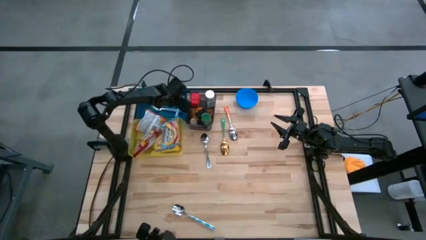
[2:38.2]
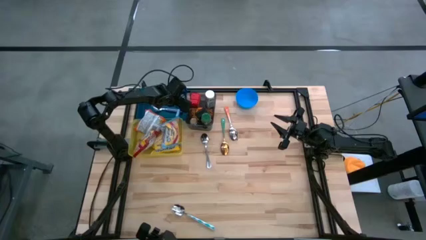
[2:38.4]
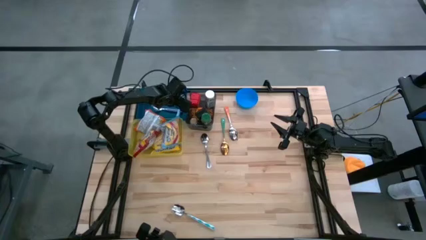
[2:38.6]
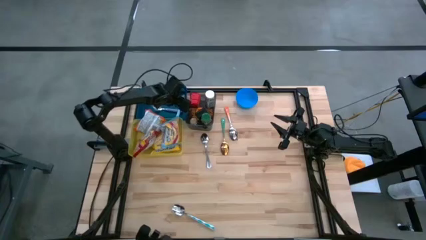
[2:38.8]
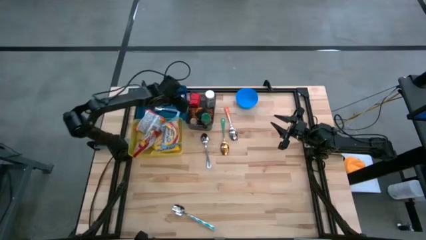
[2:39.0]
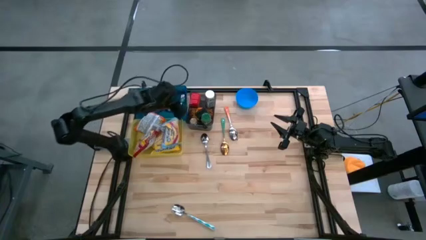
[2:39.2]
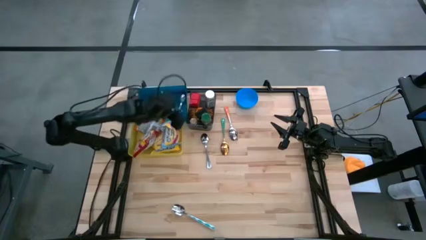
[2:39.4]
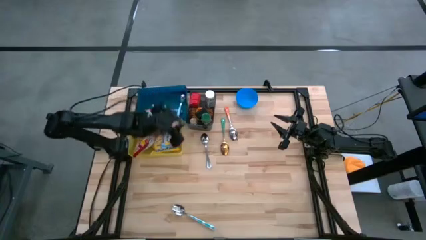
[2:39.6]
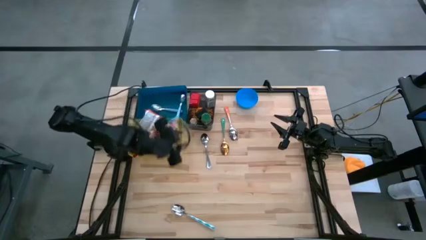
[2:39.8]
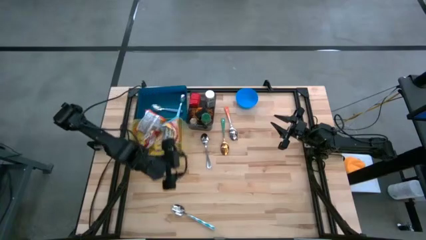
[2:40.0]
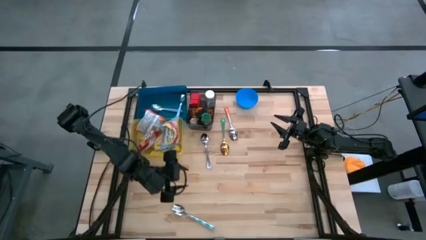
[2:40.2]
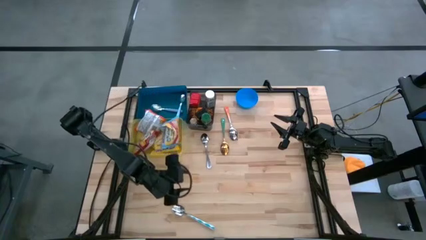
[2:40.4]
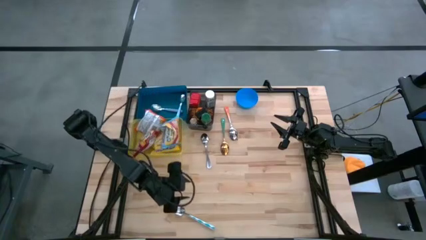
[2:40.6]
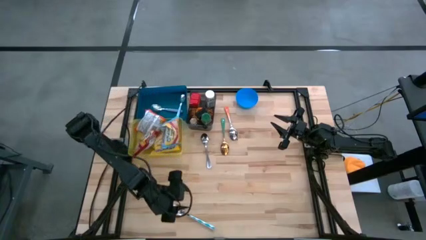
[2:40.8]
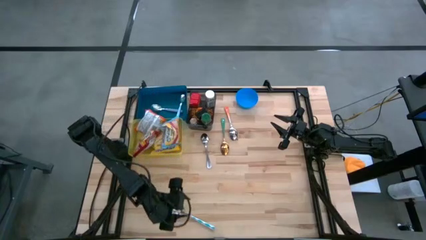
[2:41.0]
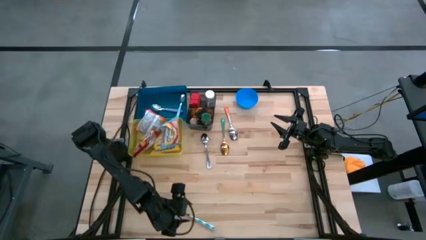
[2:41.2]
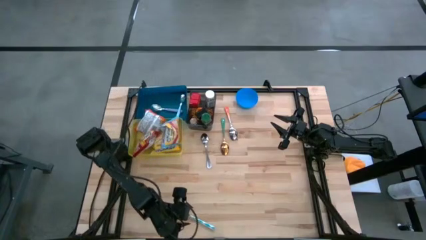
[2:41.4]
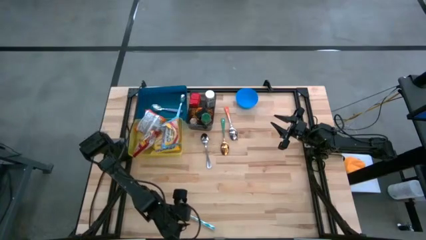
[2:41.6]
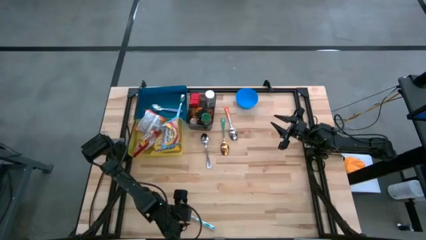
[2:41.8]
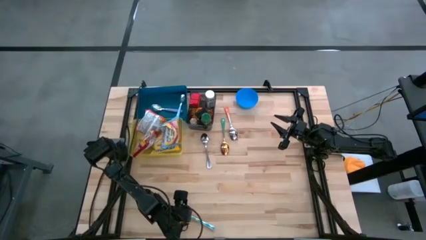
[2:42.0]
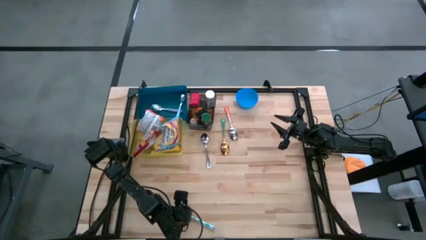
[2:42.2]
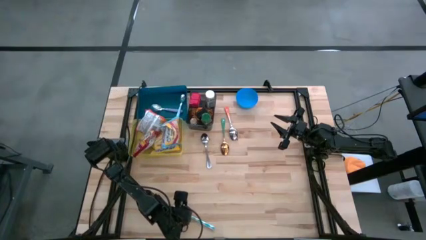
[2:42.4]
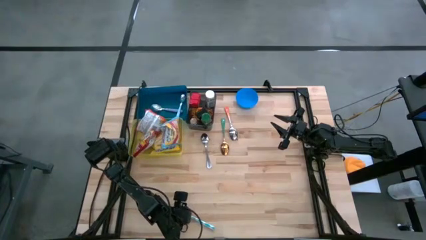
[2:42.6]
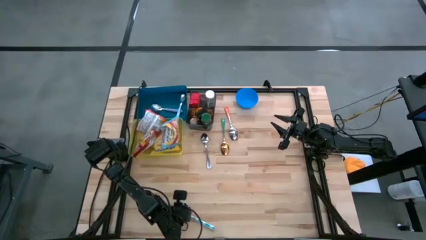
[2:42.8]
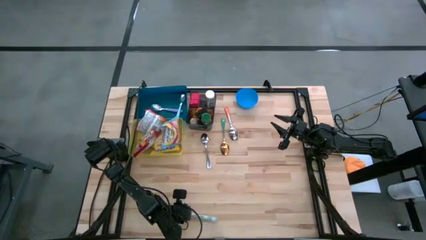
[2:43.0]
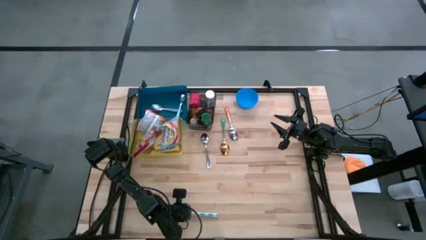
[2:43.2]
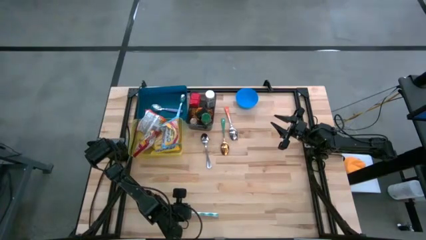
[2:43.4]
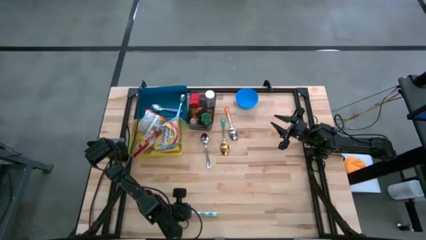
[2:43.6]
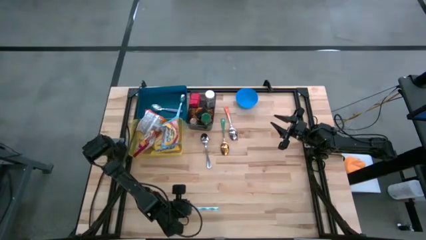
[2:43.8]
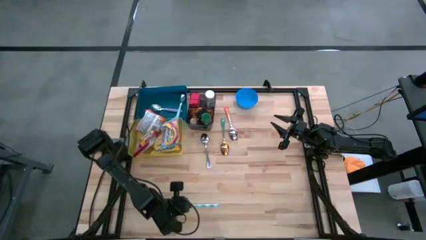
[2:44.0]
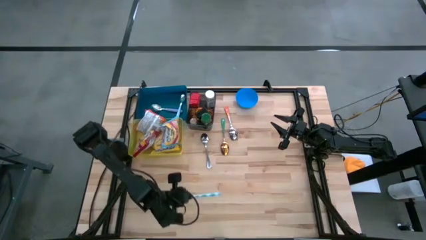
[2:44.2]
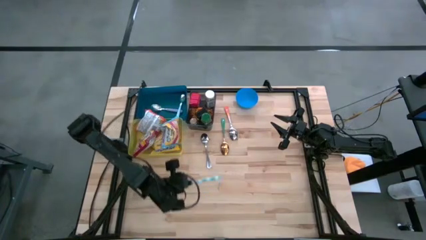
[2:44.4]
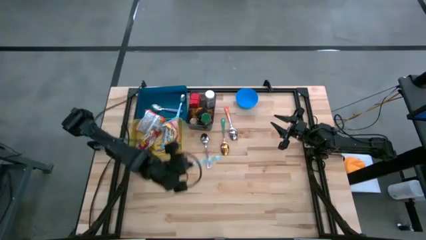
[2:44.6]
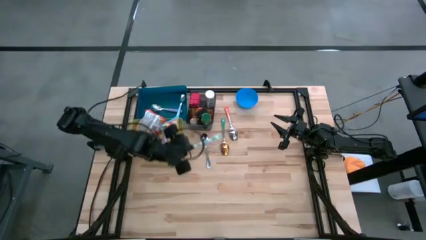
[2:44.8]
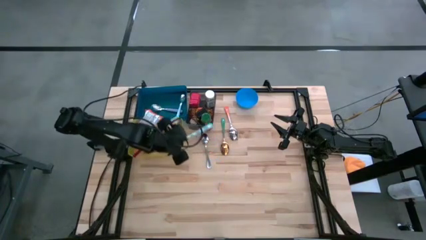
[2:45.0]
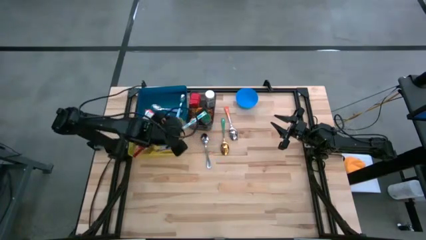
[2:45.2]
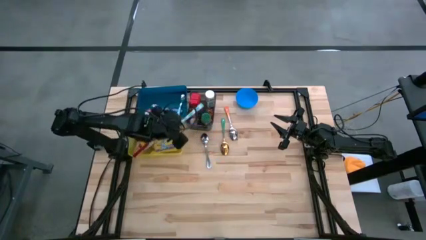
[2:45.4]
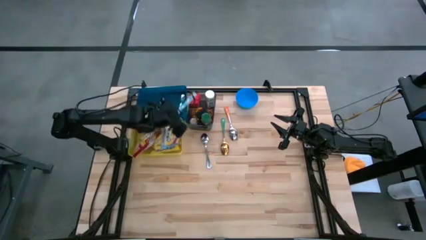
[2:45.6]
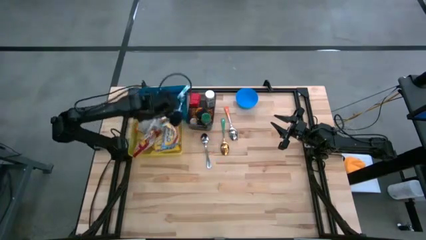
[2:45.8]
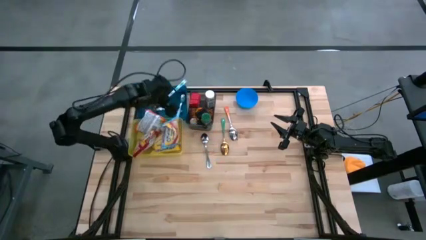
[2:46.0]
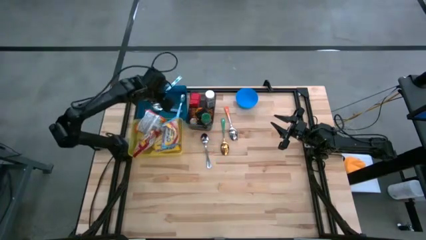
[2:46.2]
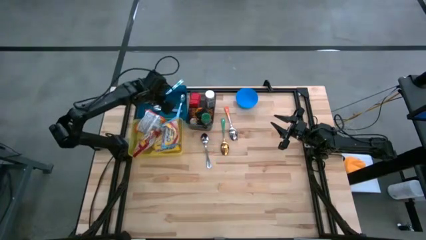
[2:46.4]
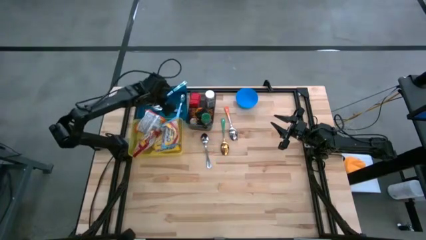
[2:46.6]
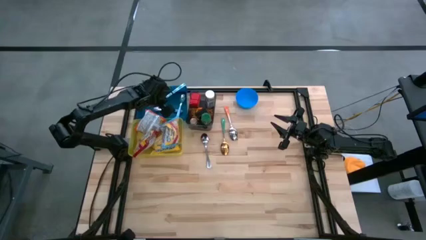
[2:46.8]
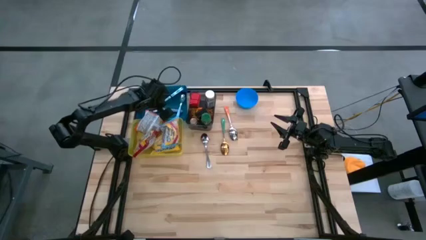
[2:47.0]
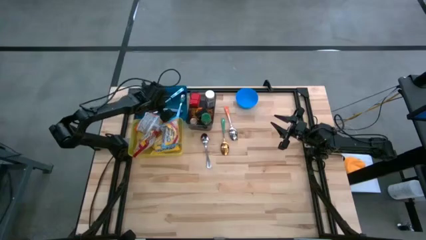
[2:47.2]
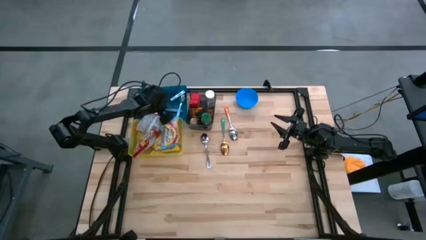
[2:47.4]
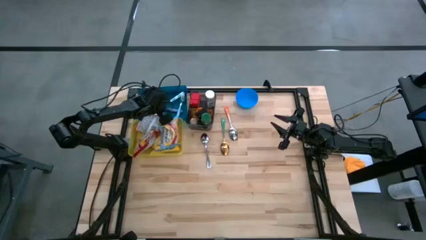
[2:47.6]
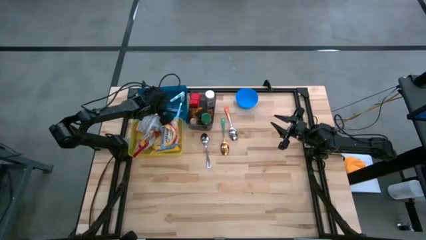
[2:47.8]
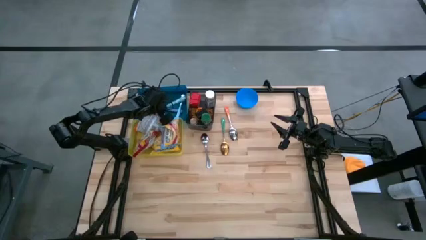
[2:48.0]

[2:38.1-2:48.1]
Put the blue pattern spoon into the blue bin

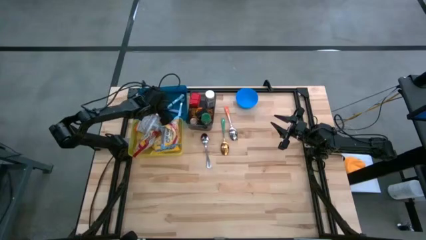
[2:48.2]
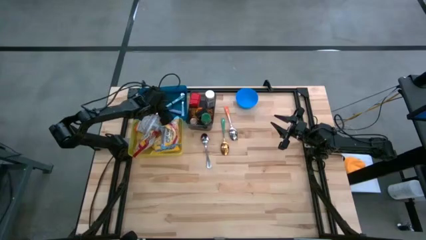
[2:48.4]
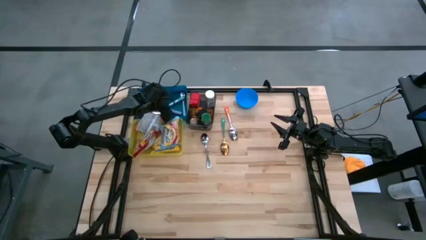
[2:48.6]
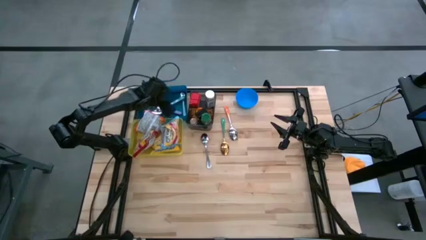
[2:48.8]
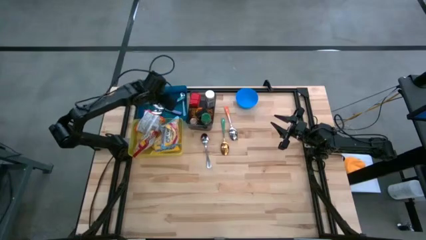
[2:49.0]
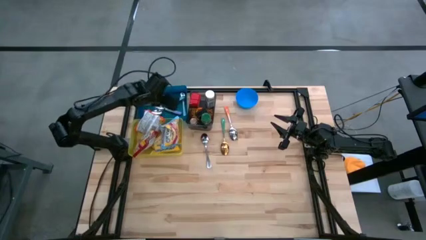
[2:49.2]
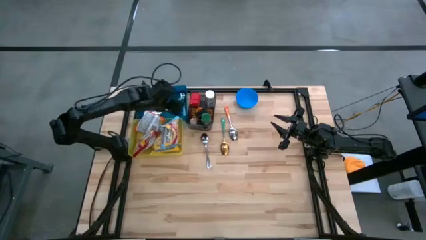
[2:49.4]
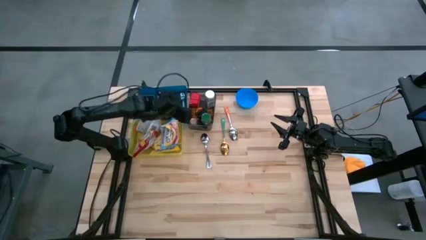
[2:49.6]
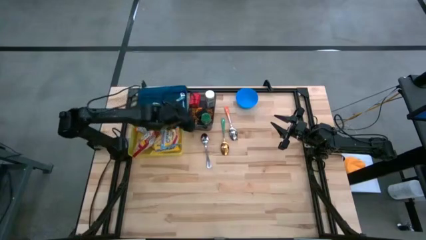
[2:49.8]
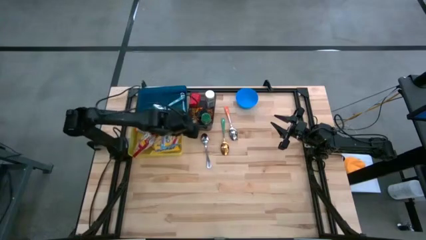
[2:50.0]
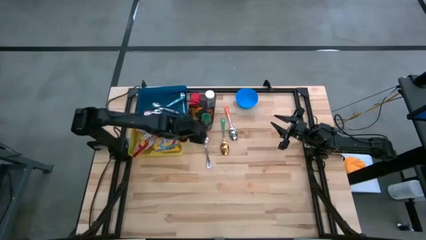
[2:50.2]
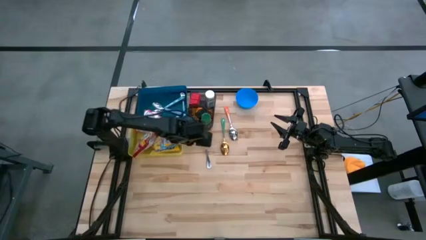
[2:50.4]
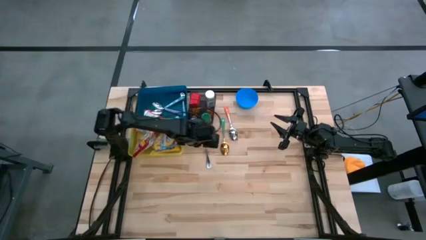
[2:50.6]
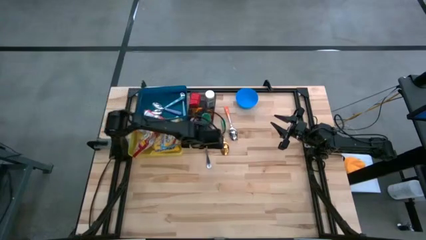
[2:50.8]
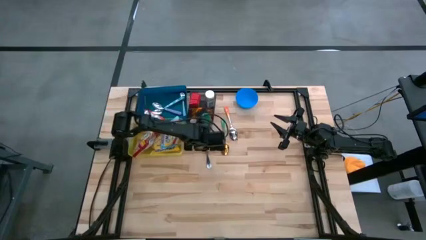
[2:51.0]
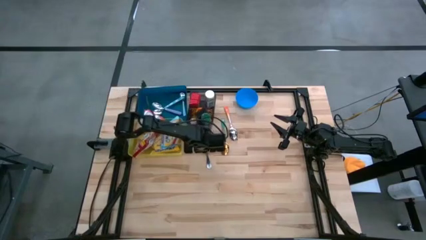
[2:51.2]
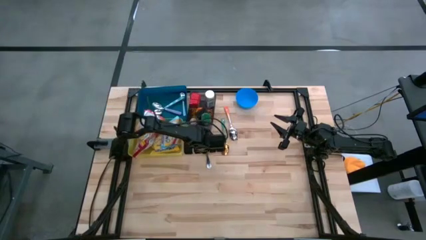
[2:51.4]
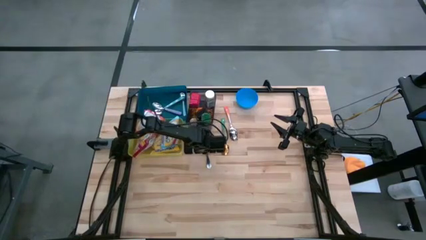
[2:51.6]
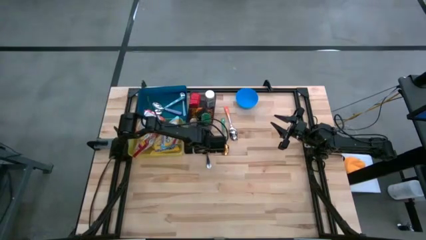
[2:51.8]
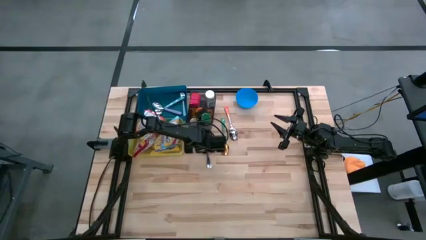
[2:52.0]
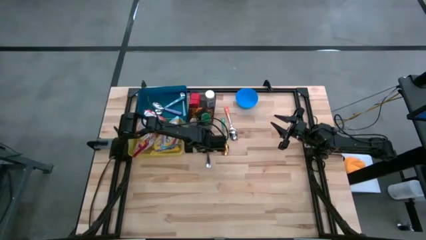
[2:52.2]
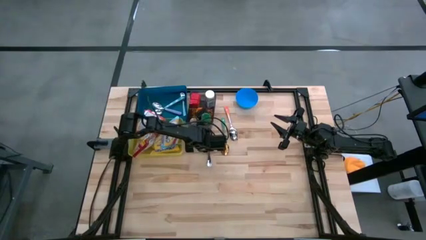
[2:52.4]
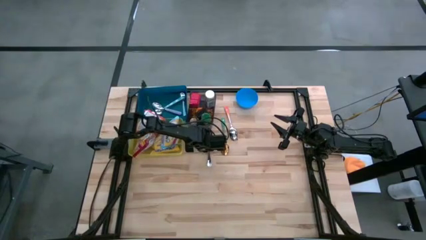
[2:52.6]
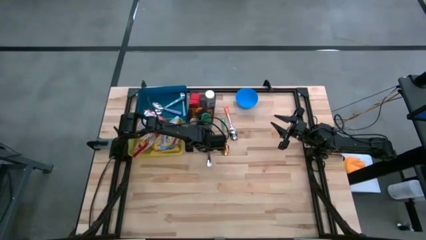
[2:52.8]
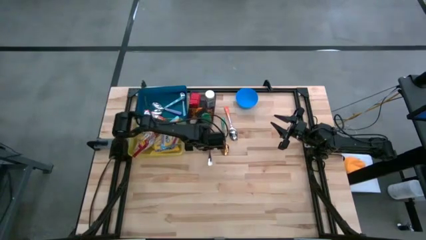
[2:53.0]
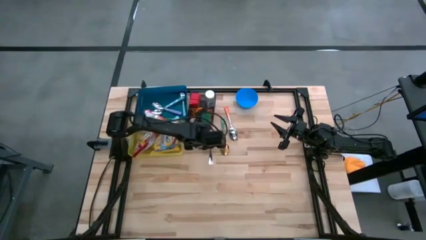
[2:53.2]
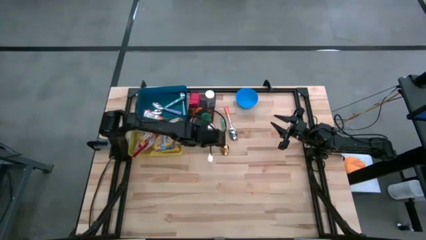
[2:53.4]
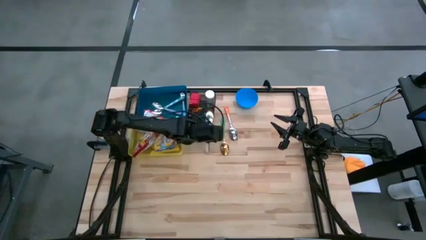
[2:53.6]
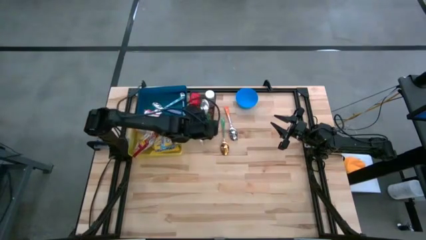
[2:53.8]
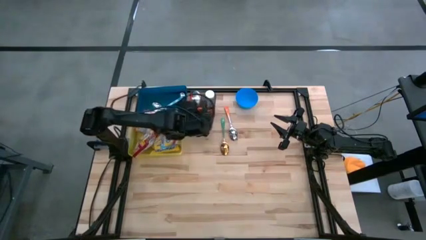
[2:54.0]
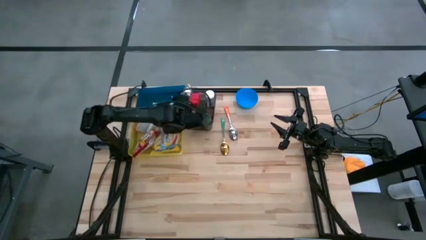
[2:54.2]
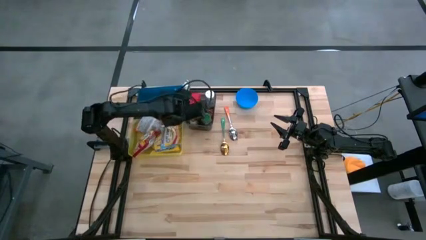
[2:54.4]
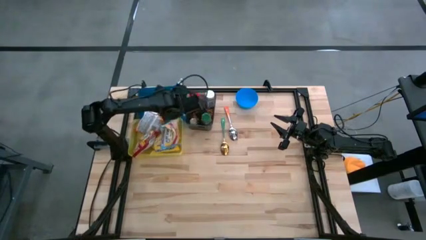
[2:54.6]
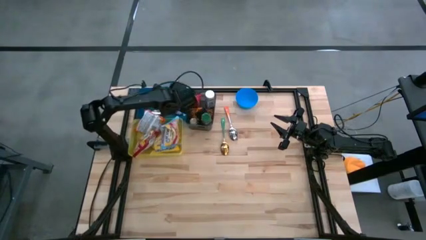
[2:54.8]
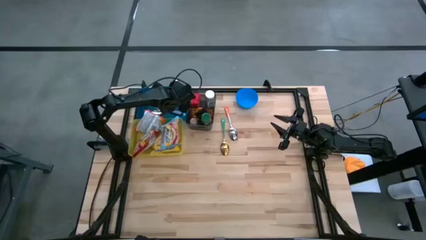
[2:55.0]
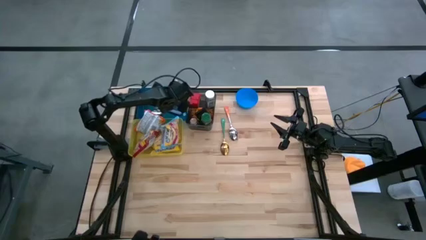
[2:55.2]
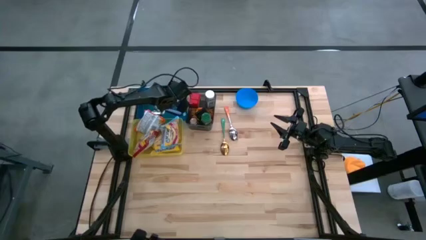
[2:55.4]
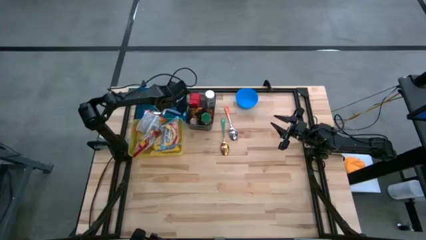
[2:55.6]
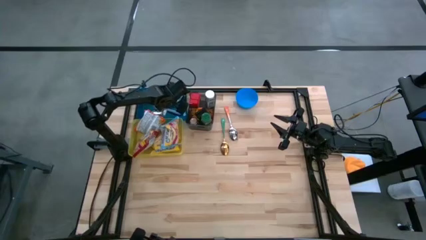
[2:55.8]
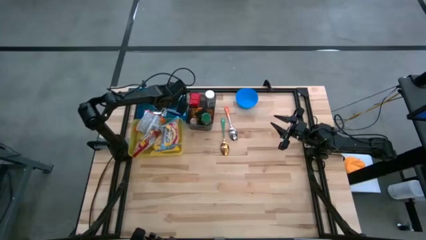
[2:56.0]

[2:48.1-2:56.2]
Put the silver spoon into the blue bin
